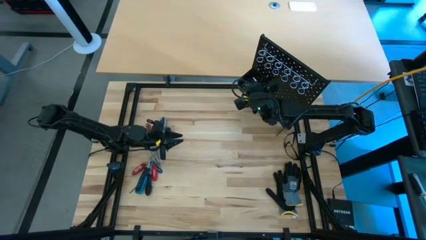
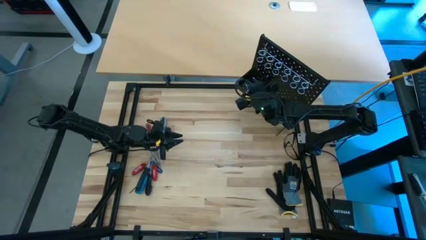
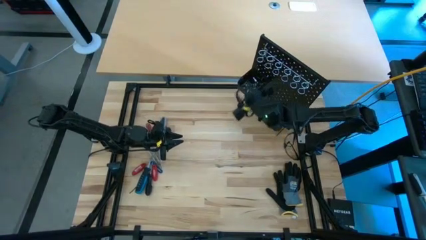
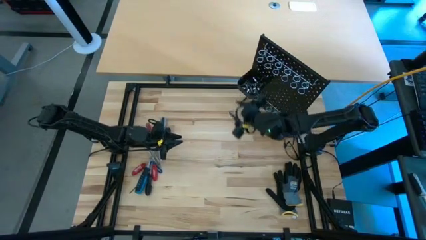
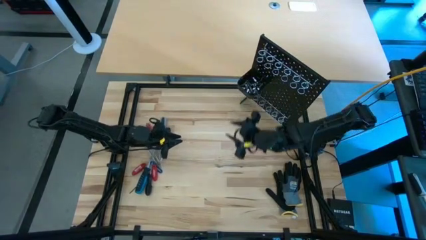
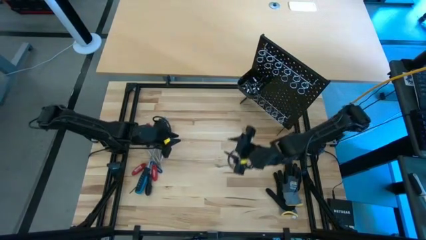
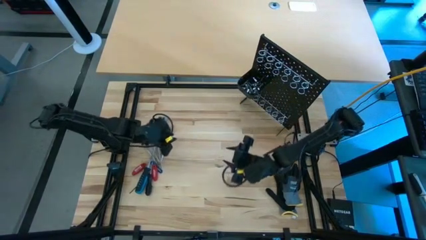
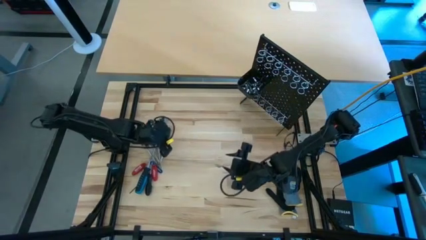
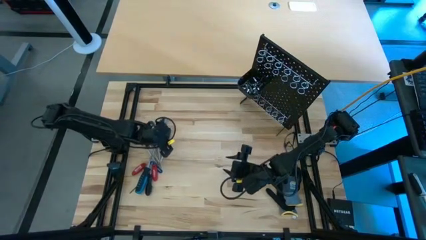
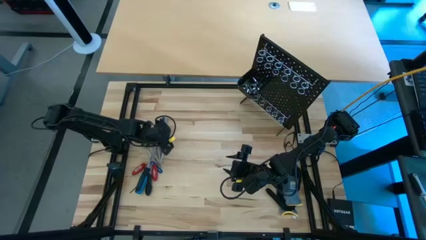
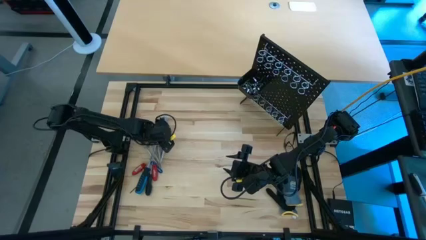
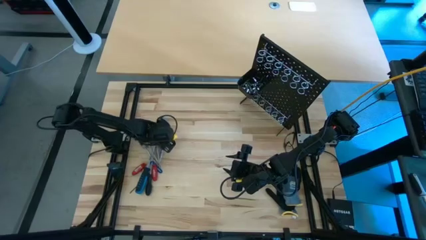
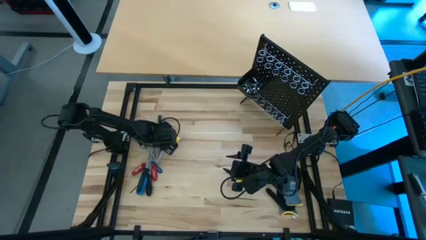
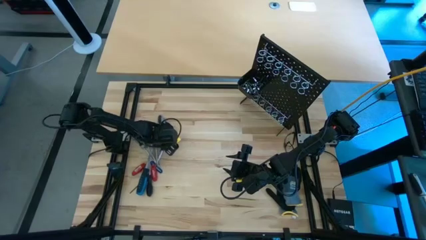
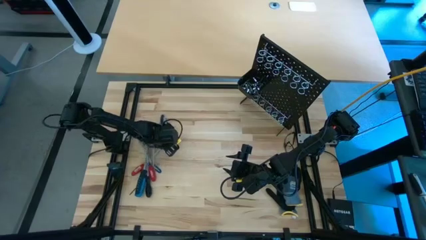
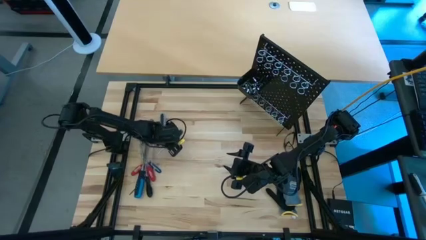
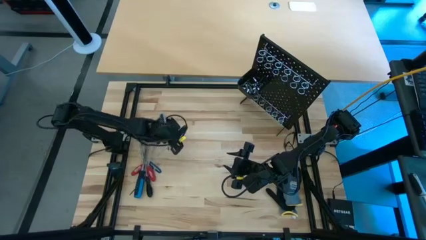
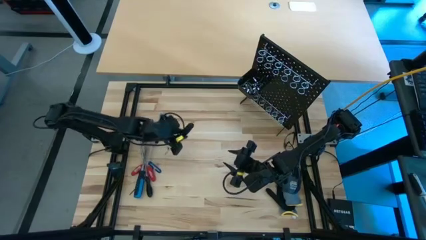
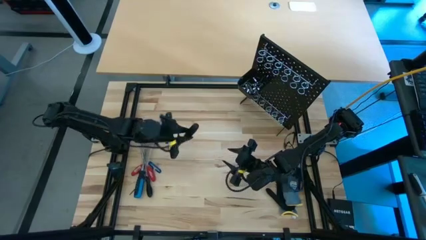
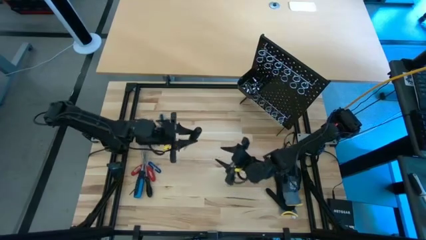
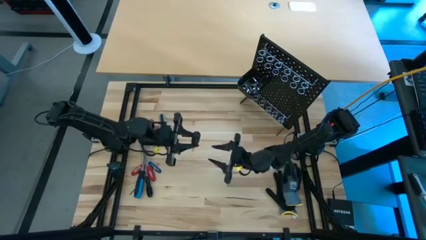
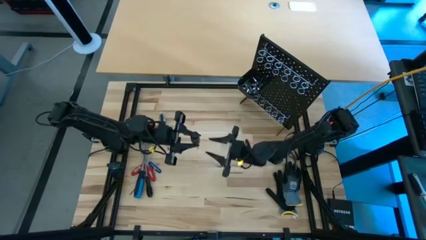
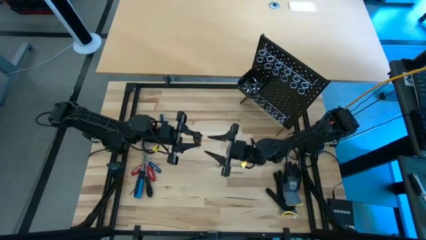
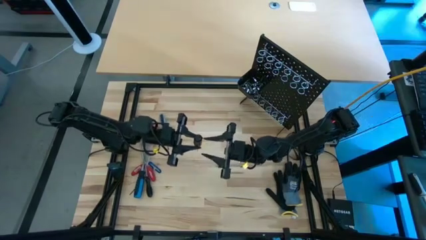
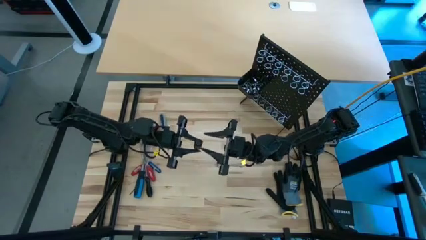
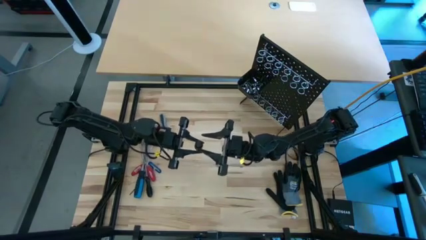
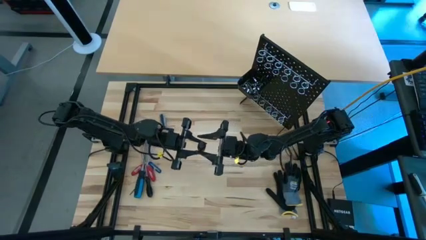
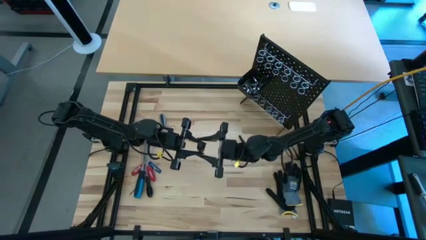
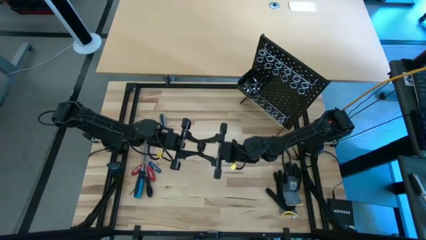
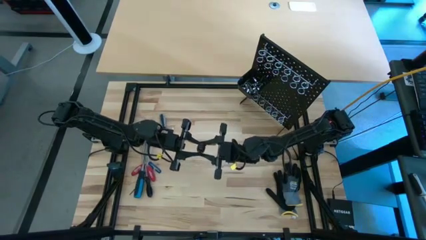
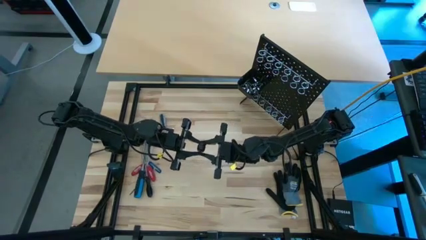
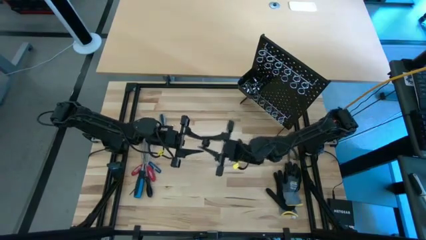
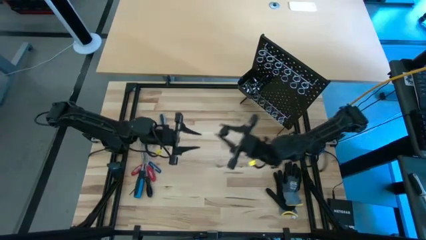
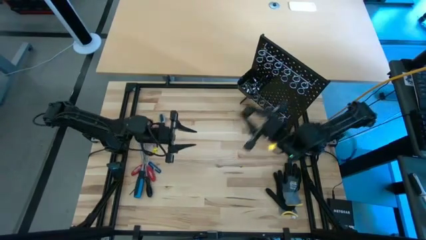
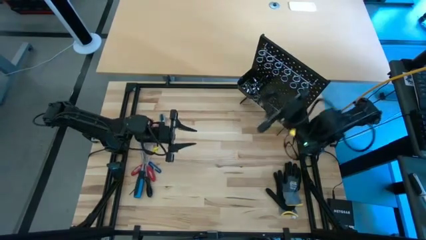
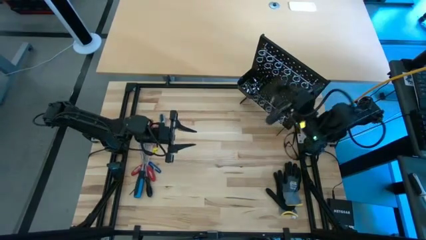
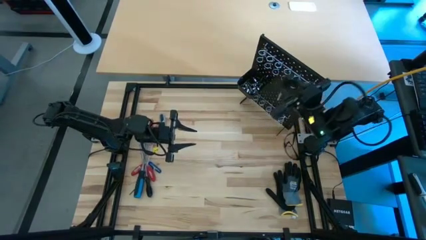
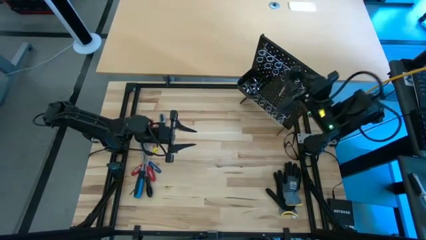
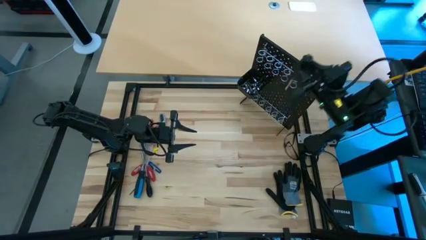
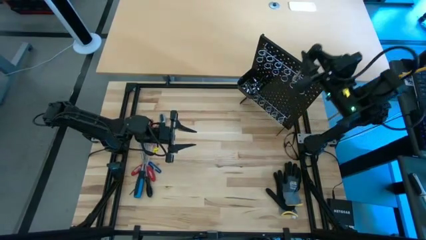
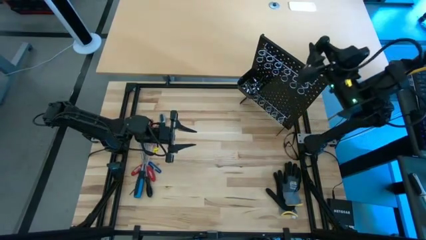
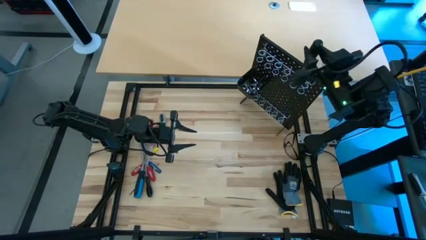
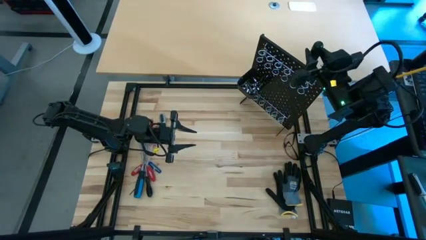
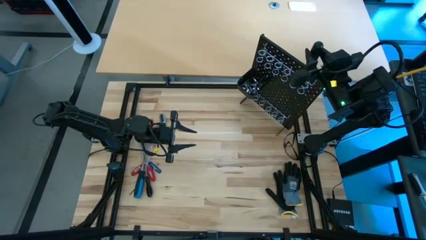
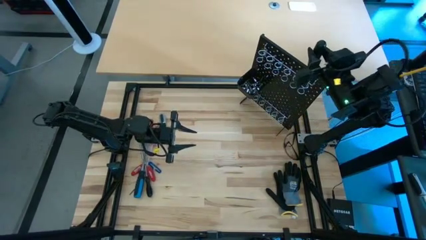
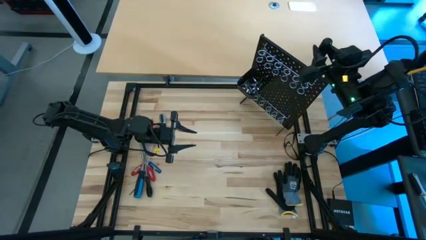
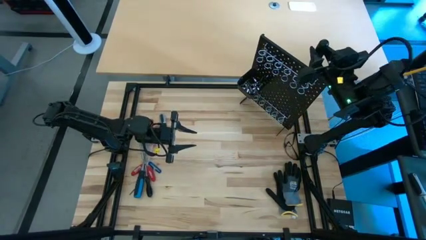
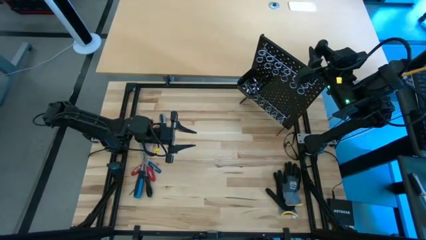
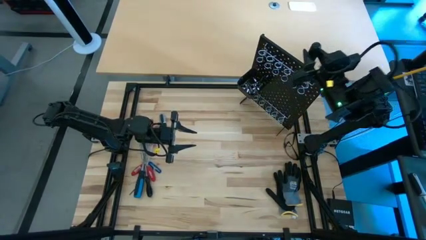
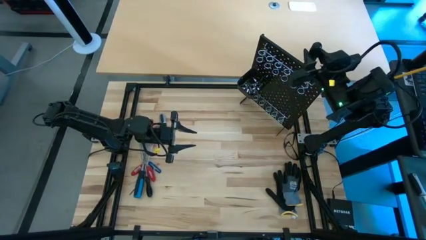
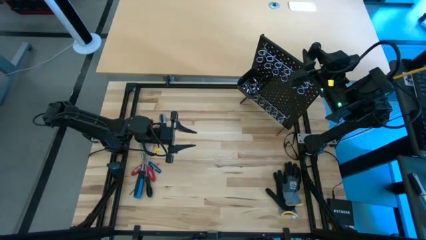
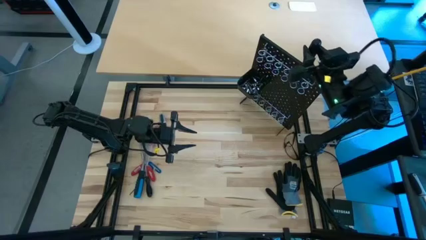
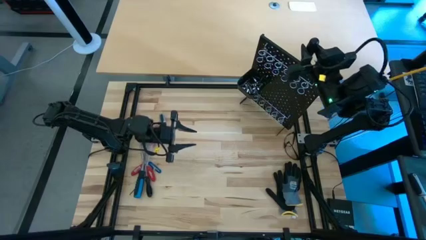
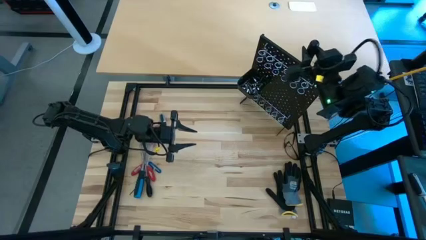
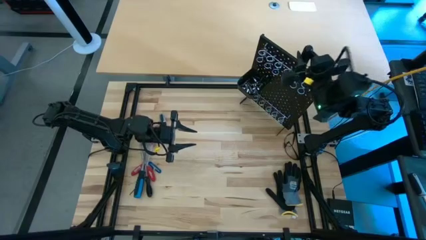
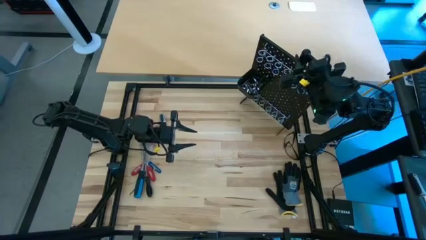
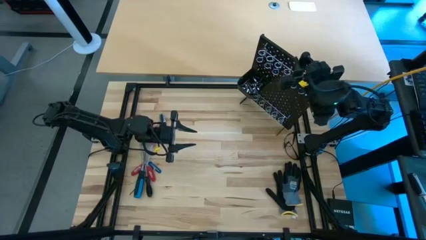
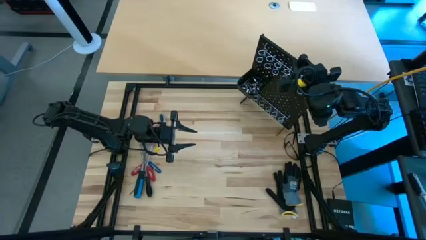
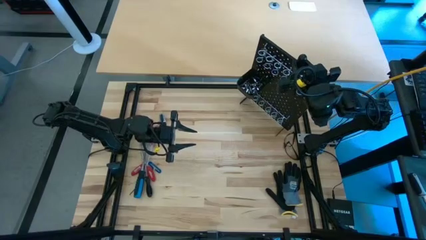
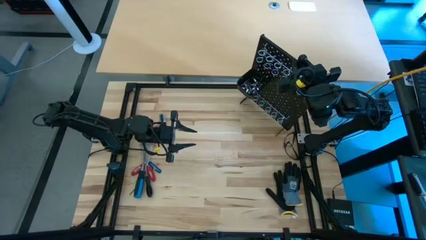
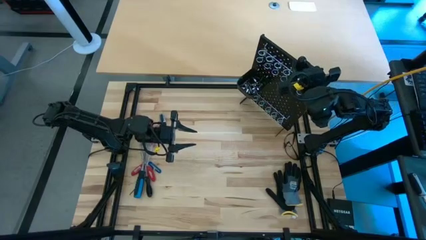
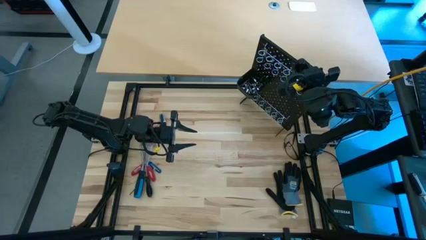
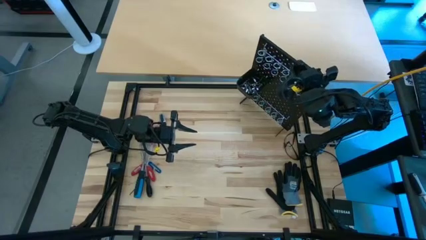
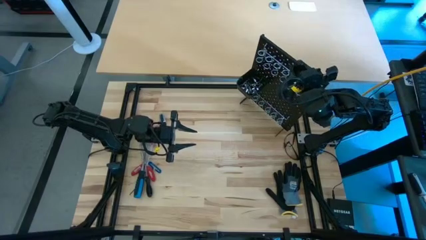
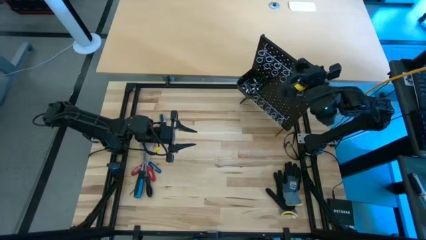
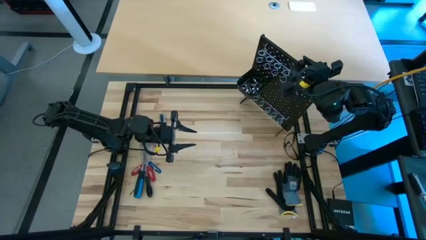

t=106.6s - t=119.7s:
Task: Hang tools onto peg board
Hang the top black screwdriver on the black pegboard
